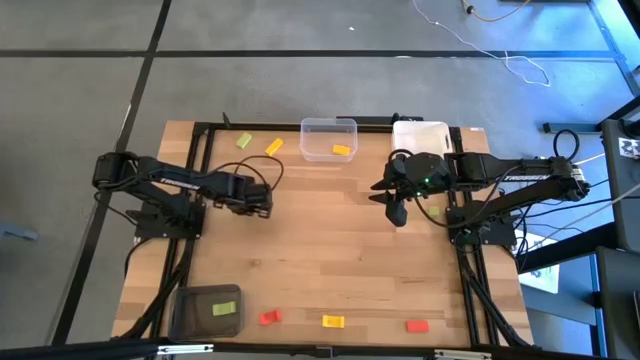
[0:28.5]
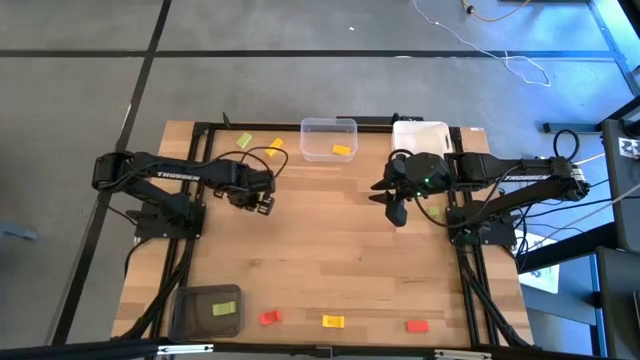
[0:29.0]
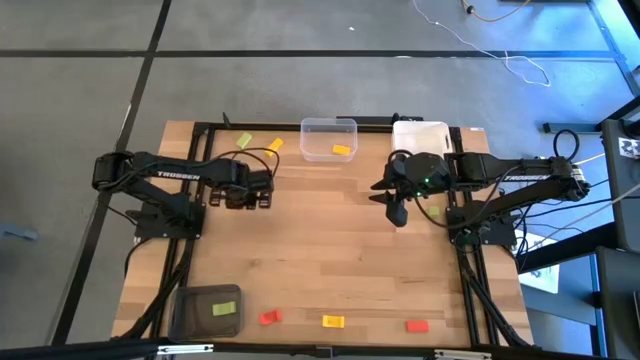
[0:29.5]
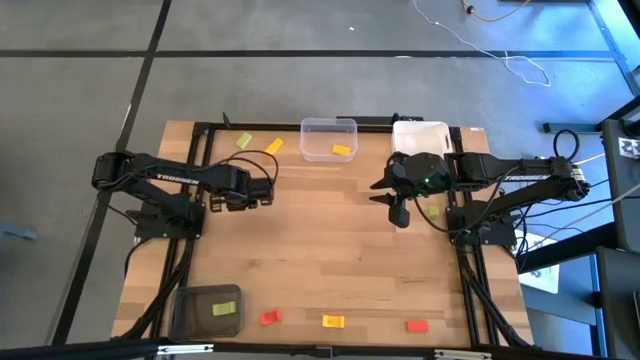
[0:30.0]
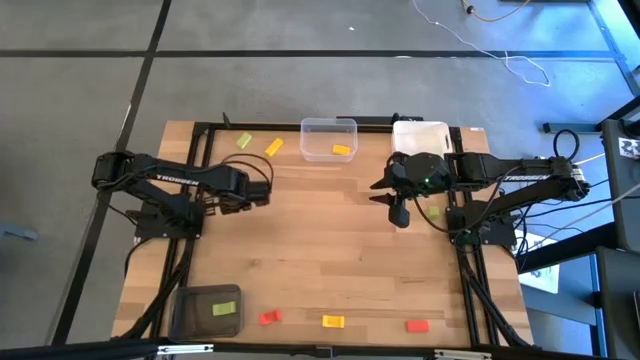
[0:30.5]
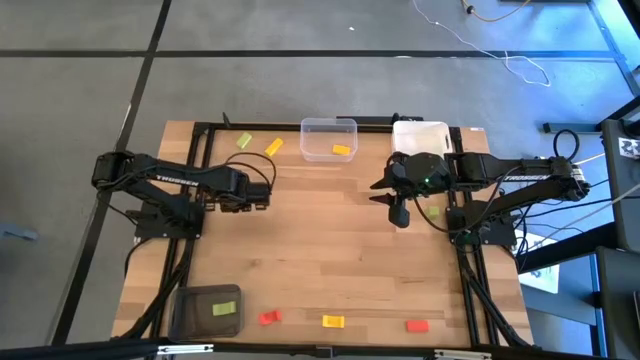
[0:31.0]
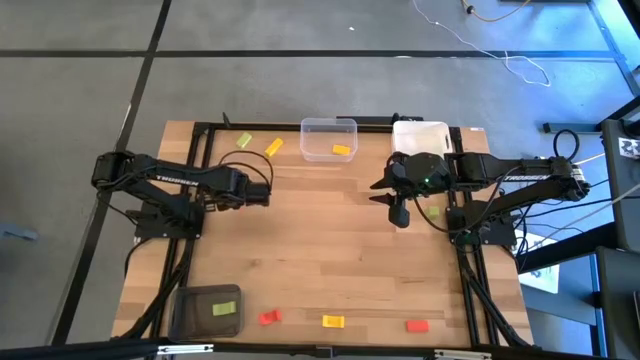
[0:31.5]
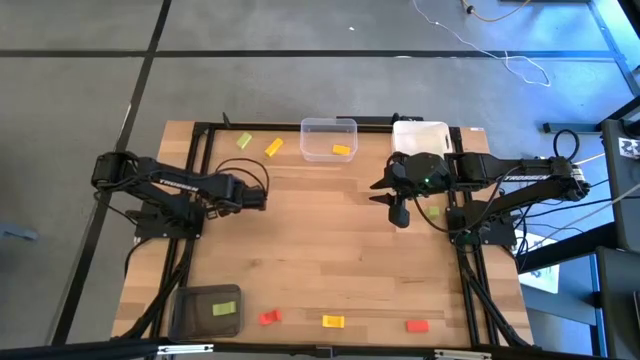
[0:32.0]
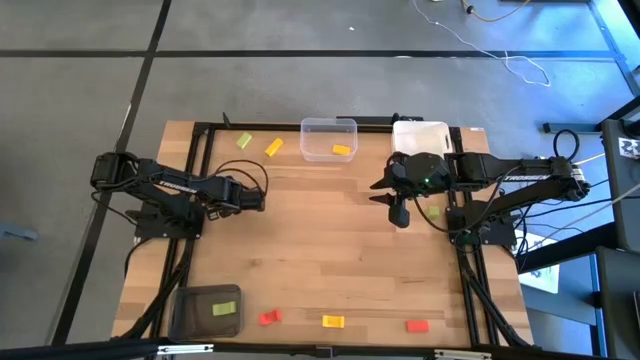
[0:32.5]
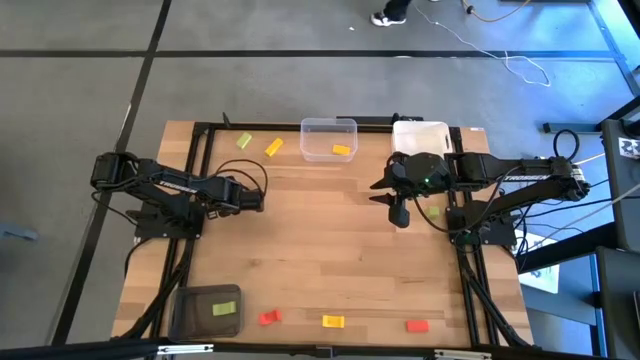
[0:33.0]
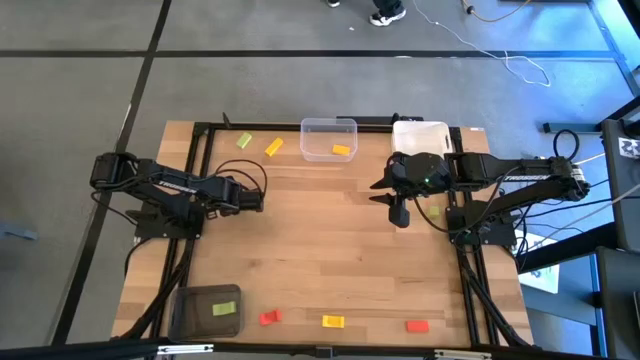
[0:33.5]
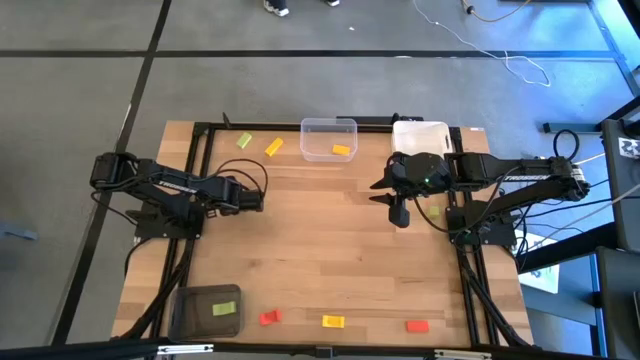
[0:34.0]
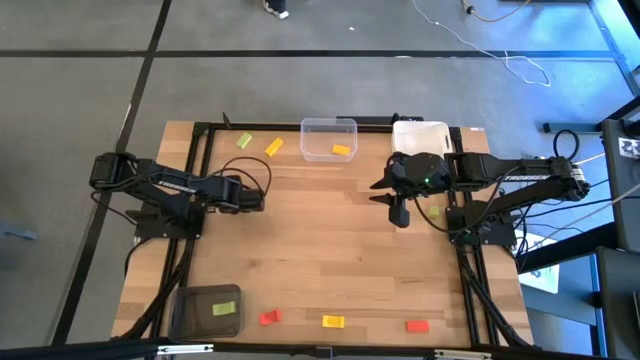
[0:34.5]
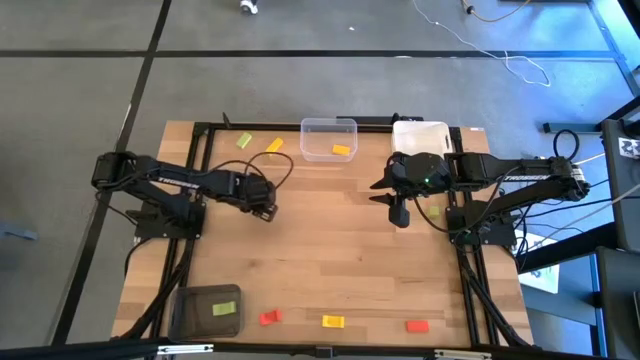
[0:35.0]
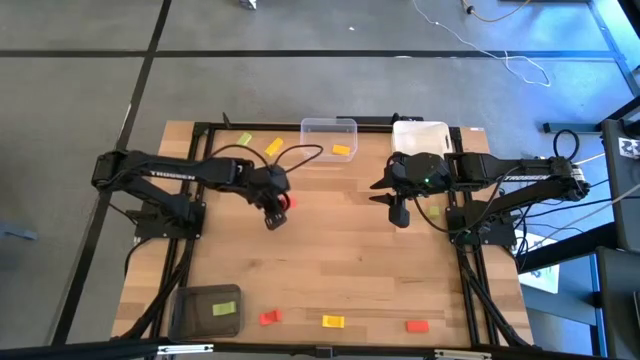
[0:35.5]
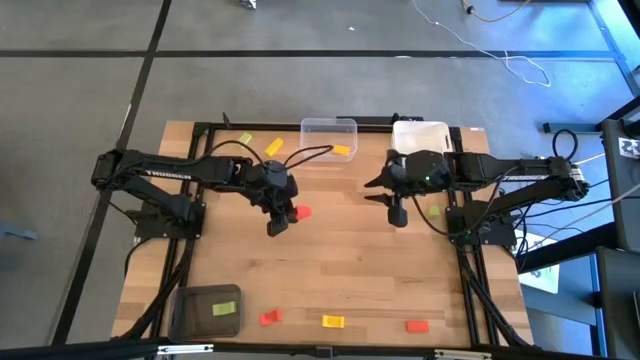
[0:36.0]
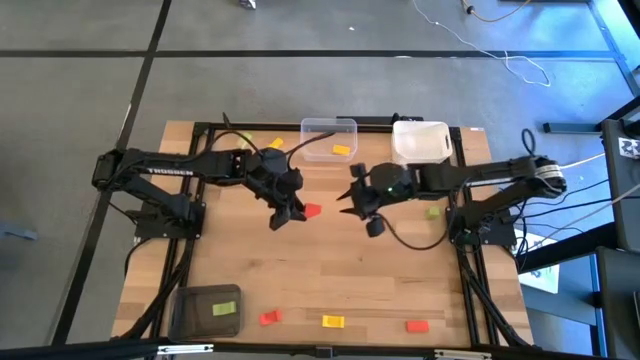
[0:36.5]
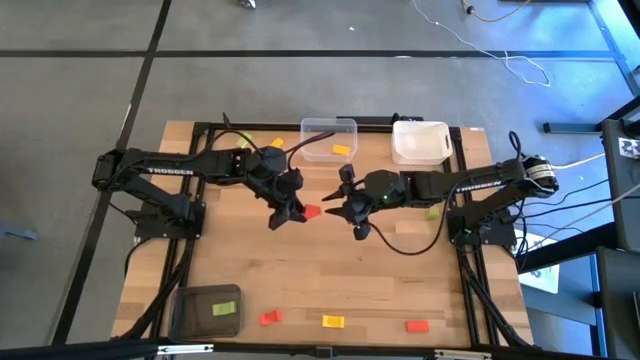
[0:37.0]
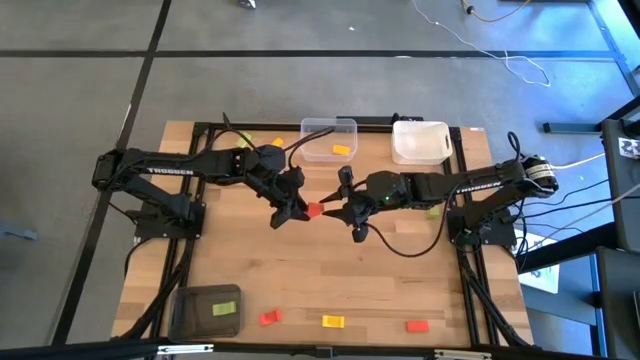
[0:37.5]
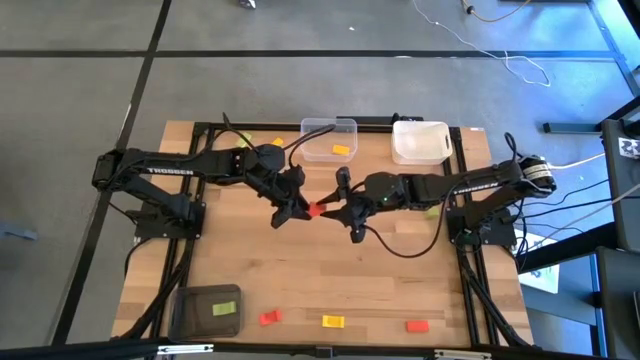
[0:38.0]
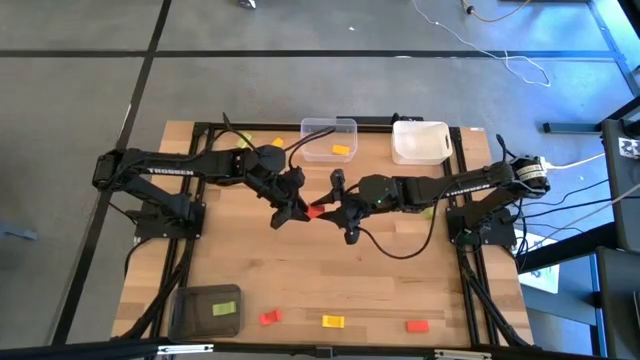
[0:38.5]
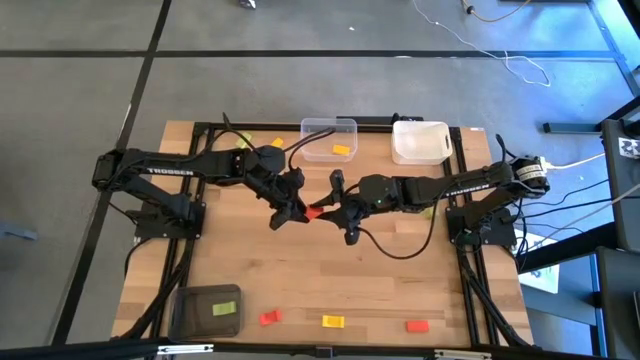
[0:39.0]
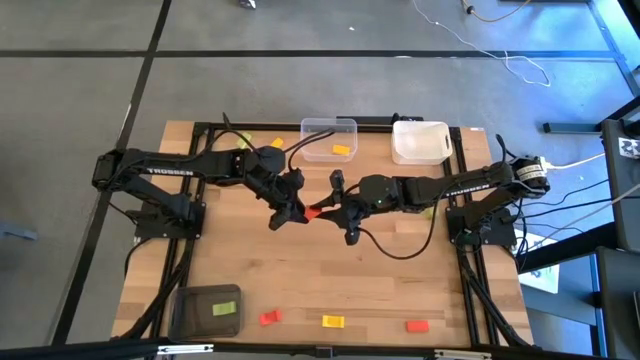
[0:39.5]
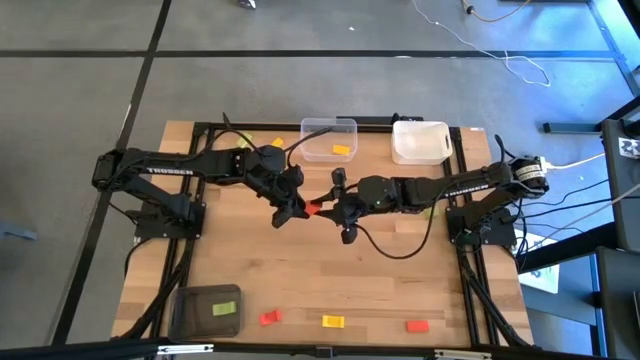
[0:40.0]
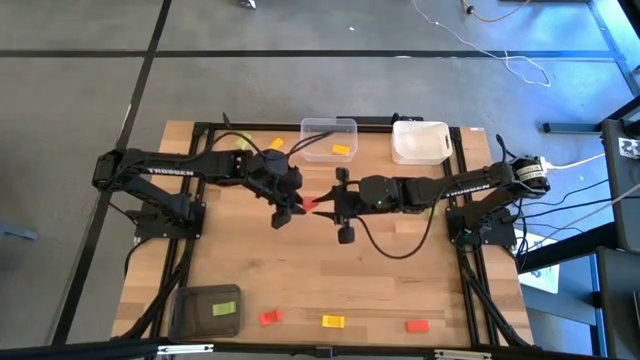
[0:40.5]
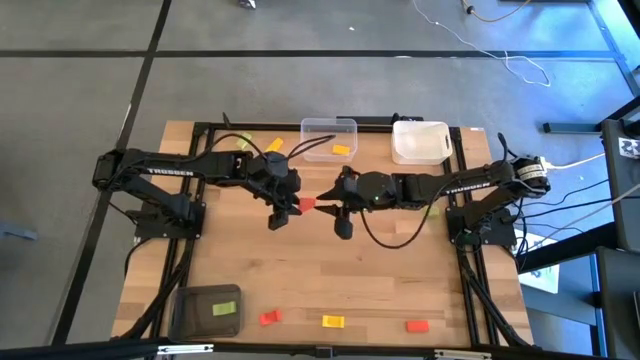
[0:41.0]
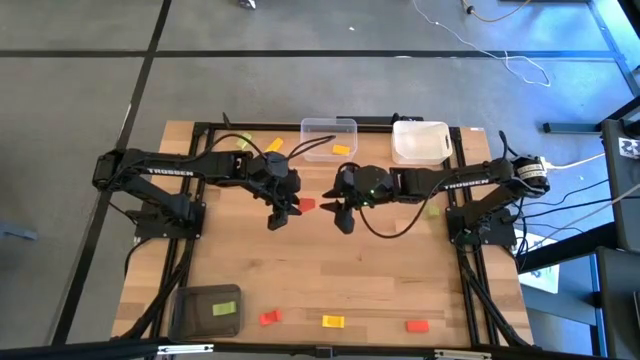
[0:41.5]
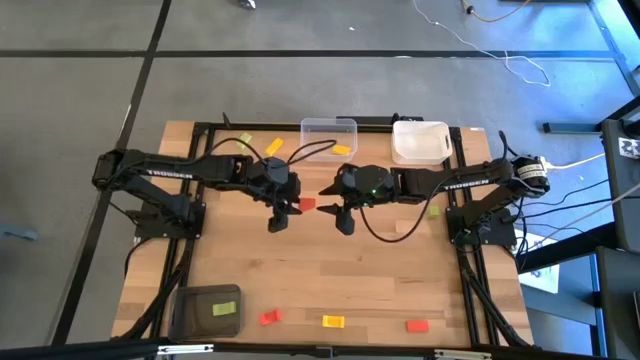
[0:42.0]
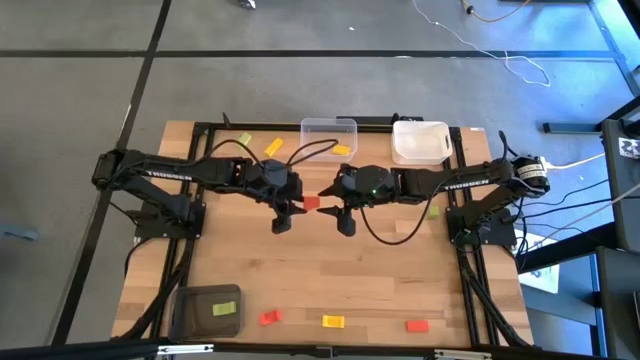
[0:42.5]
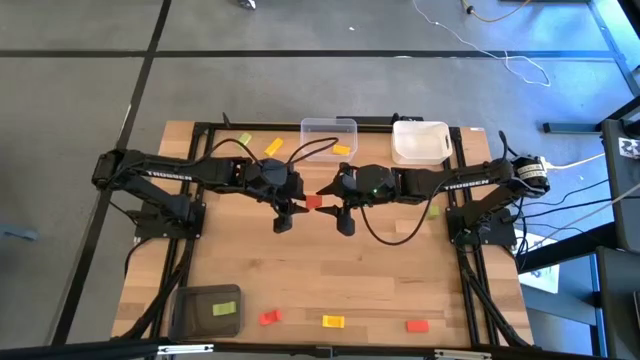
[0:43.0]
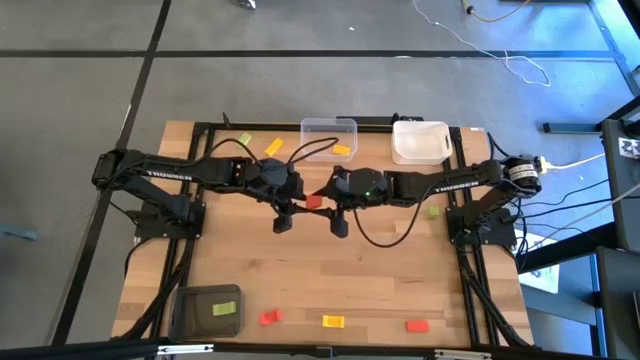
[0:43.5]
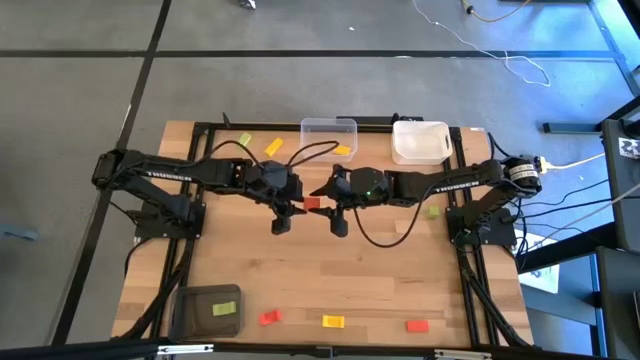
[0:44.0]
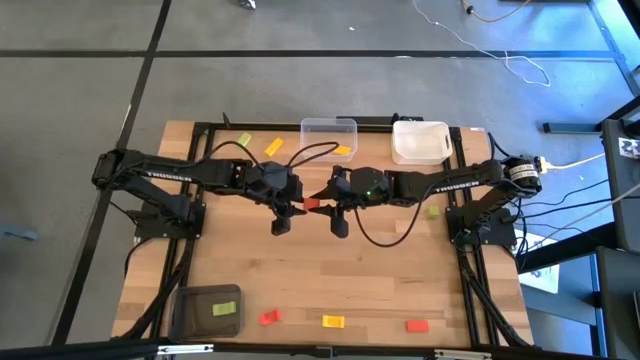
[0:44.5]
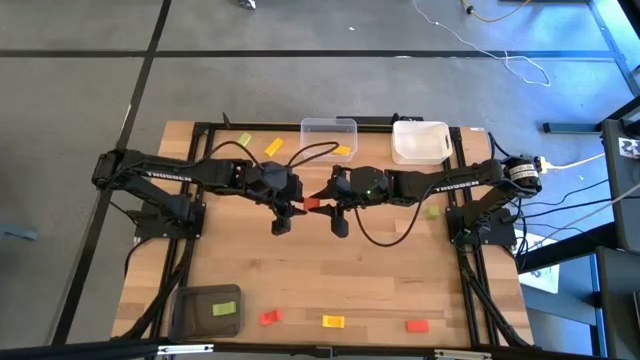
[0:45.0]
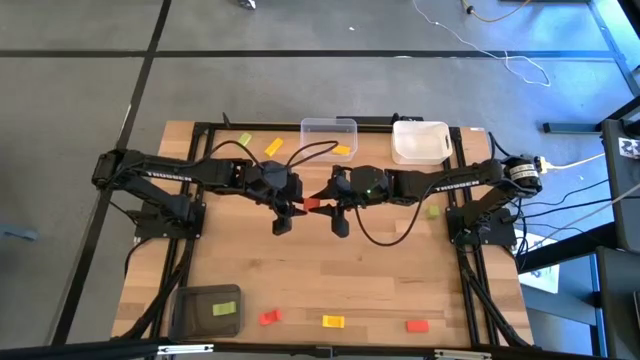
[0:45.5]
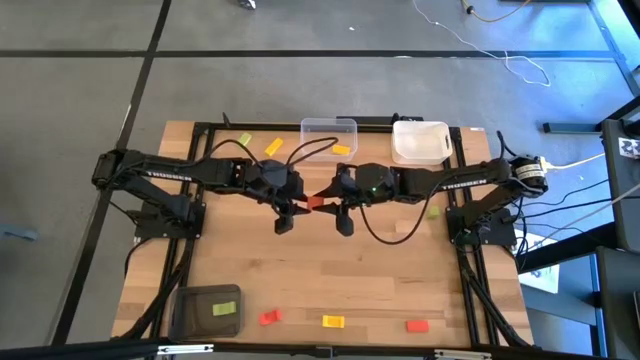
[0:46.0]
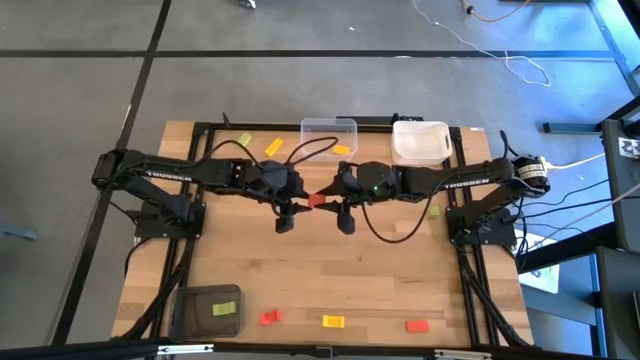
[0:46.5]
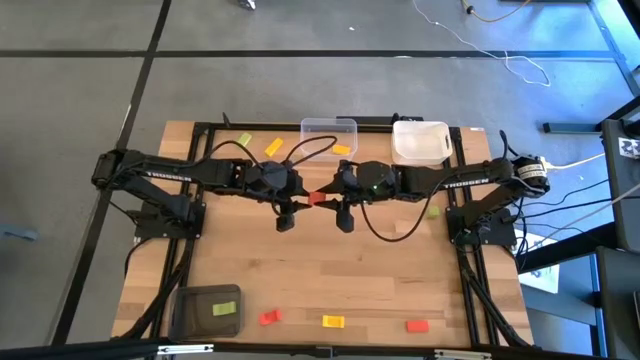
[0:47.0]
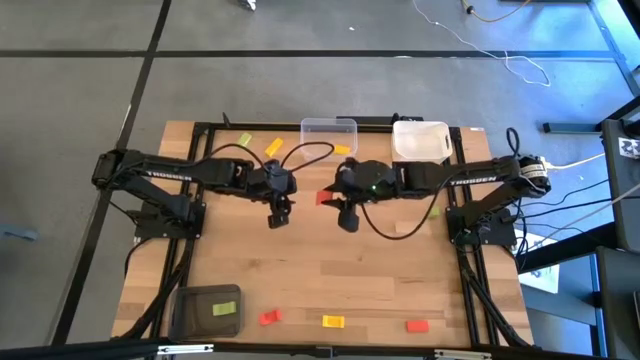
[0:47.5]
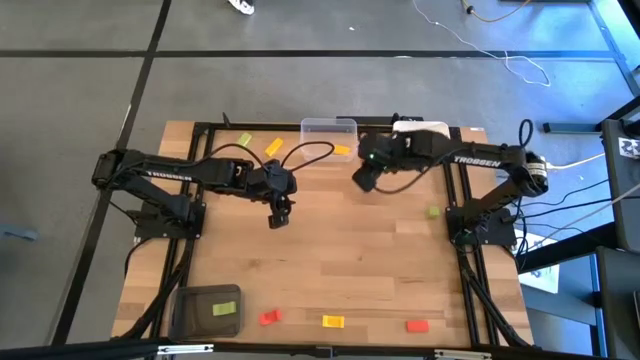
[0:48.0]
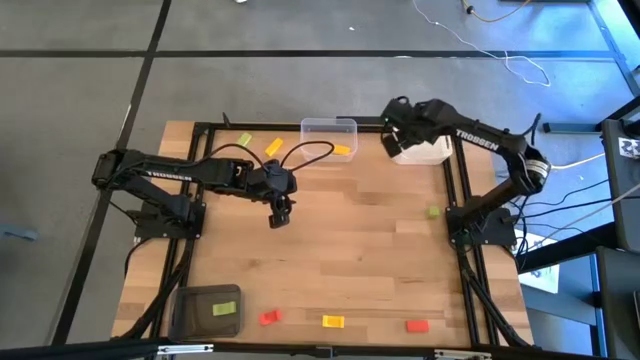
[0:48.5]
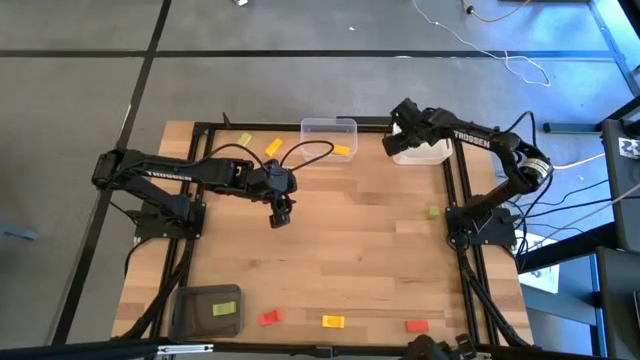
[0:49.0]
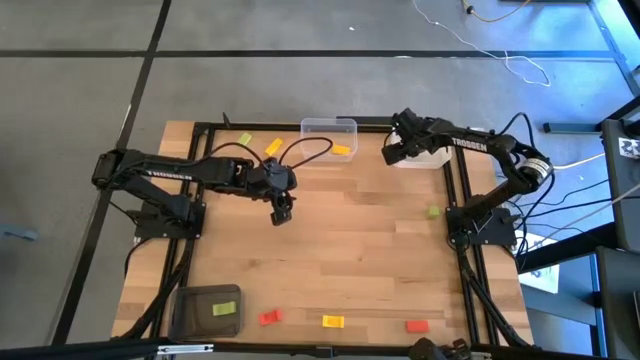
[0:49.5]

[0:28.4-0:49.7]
Task: Sort & place blocks by color
Put the top left orange block into the white bin
